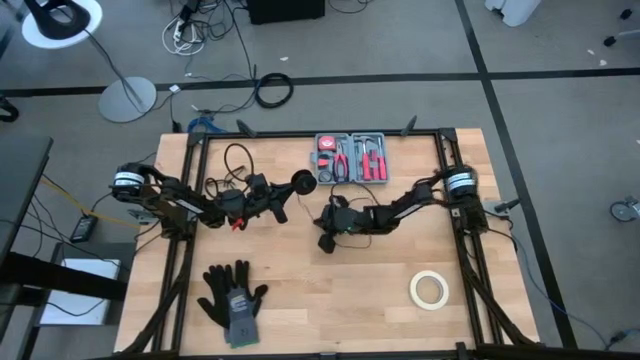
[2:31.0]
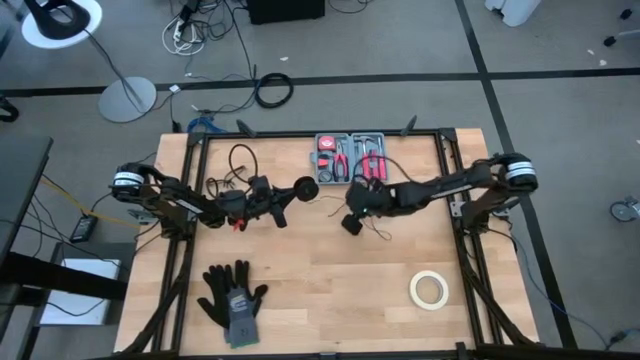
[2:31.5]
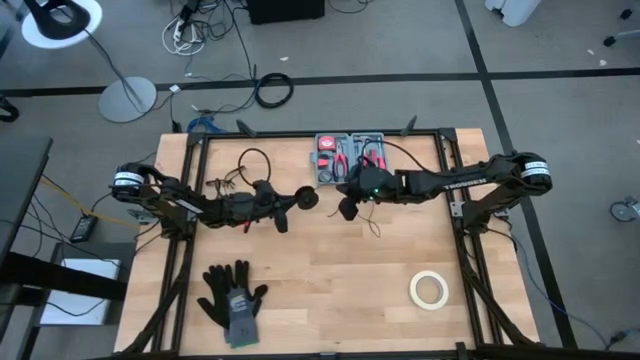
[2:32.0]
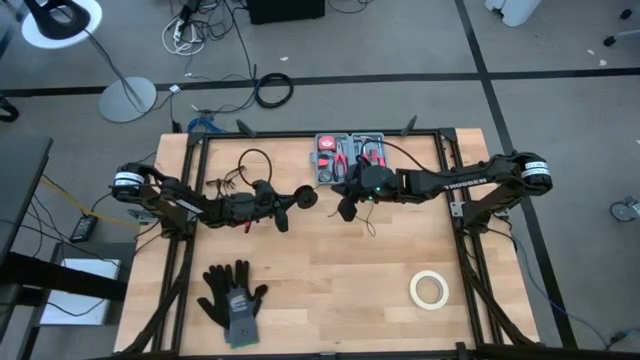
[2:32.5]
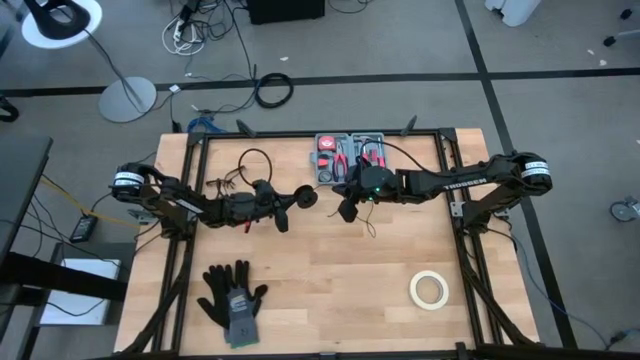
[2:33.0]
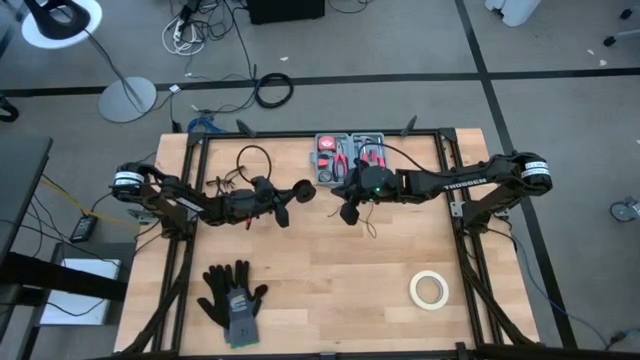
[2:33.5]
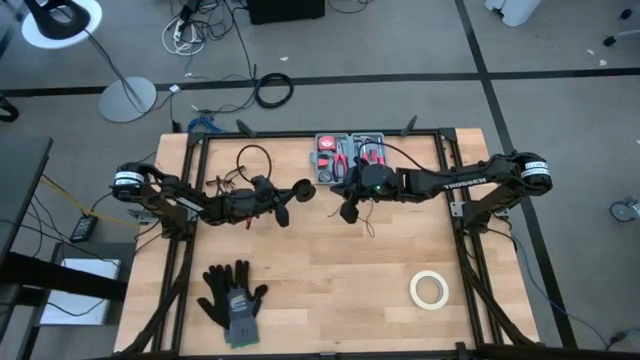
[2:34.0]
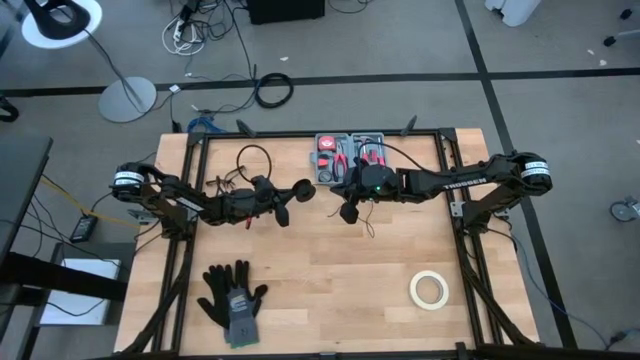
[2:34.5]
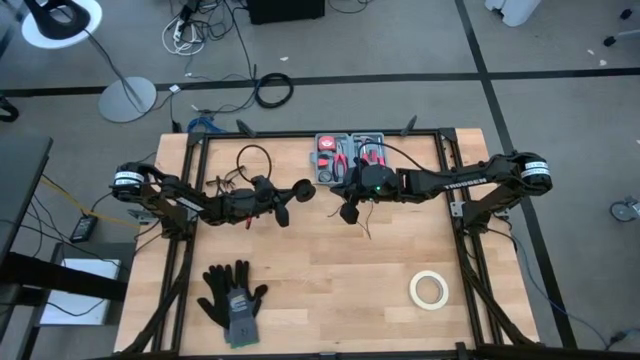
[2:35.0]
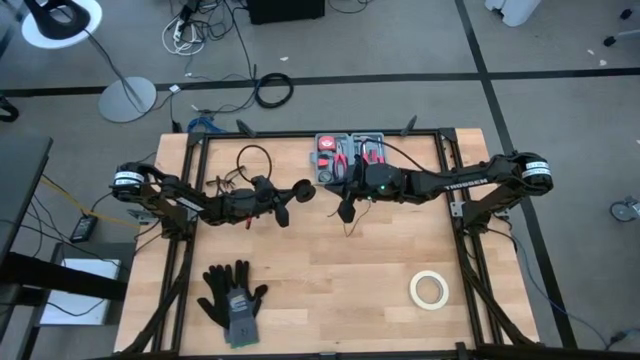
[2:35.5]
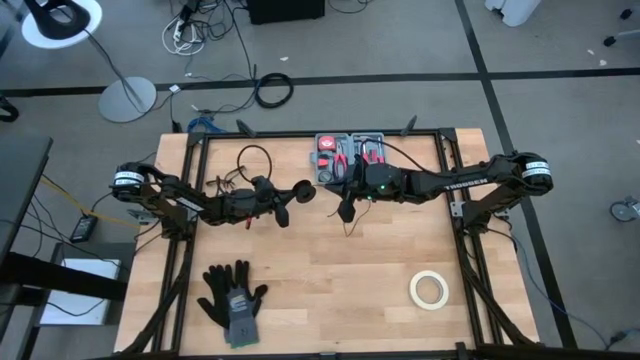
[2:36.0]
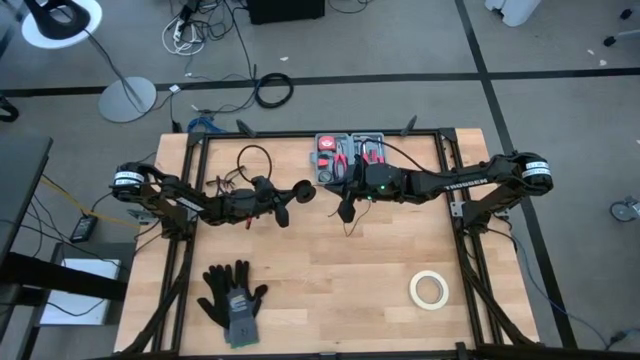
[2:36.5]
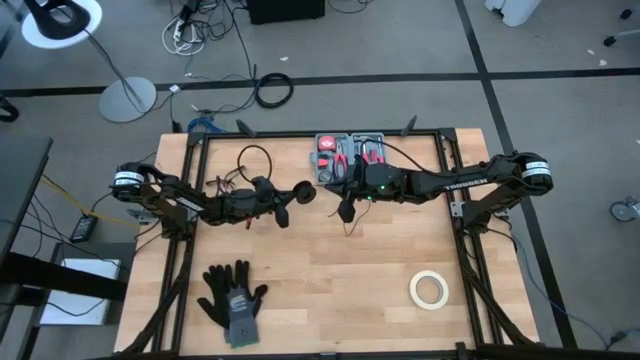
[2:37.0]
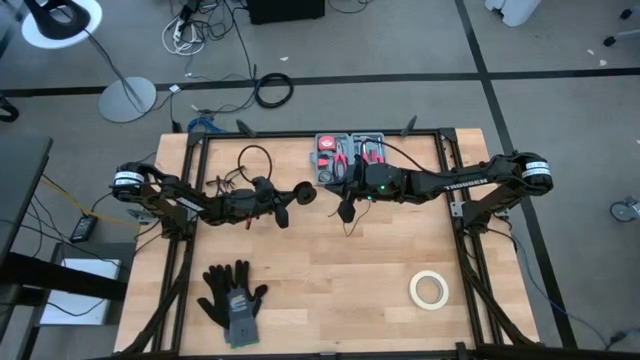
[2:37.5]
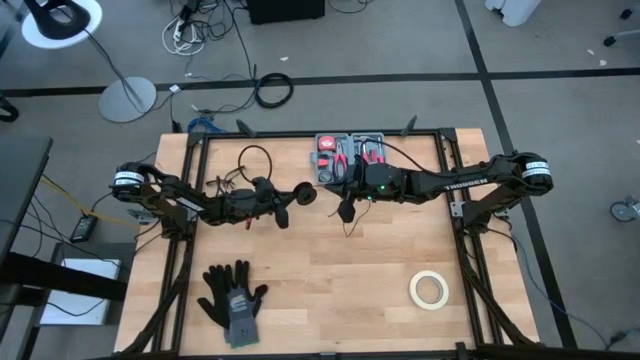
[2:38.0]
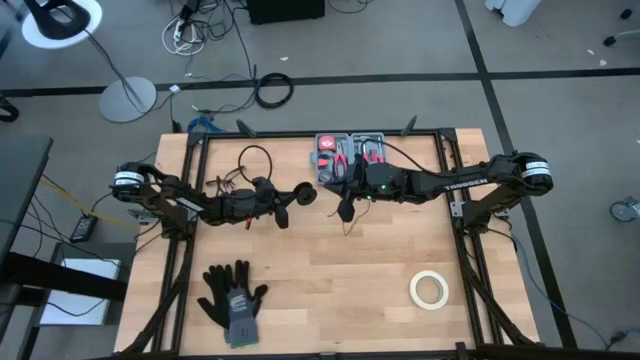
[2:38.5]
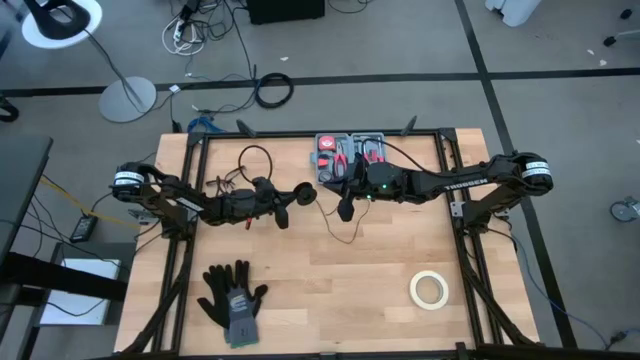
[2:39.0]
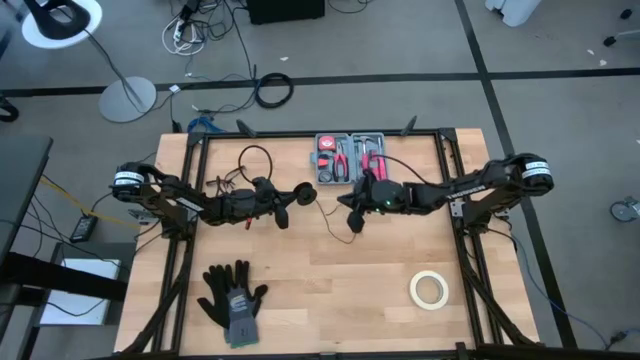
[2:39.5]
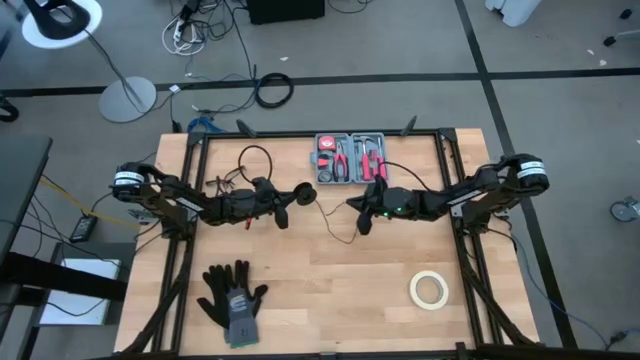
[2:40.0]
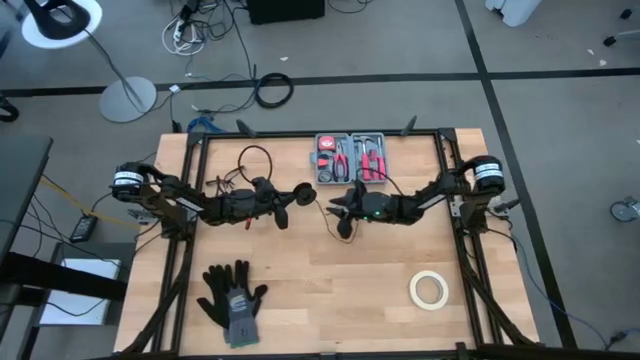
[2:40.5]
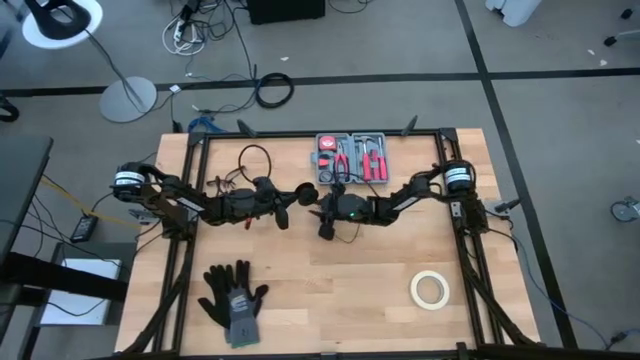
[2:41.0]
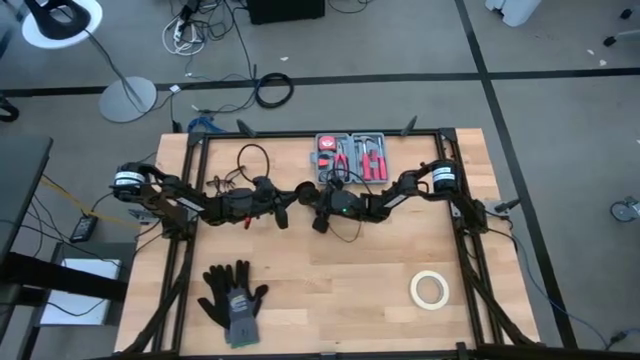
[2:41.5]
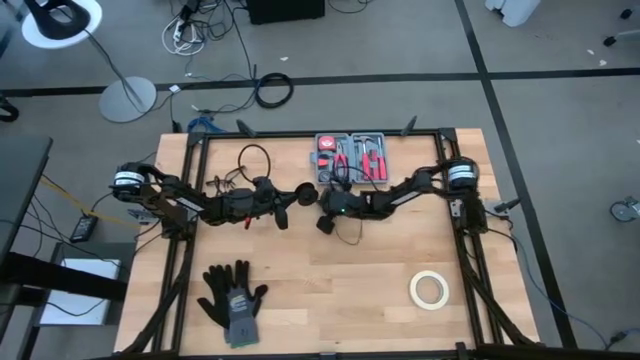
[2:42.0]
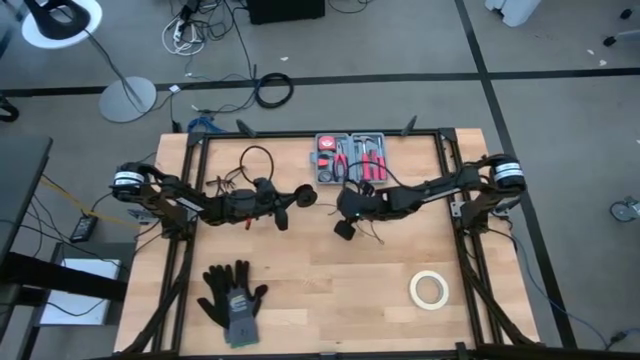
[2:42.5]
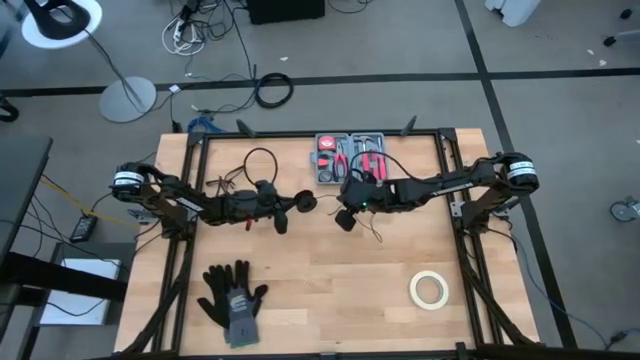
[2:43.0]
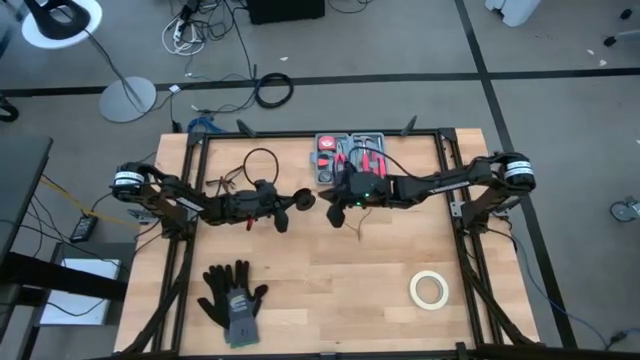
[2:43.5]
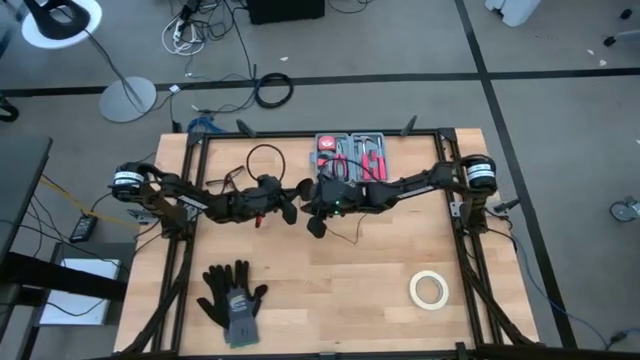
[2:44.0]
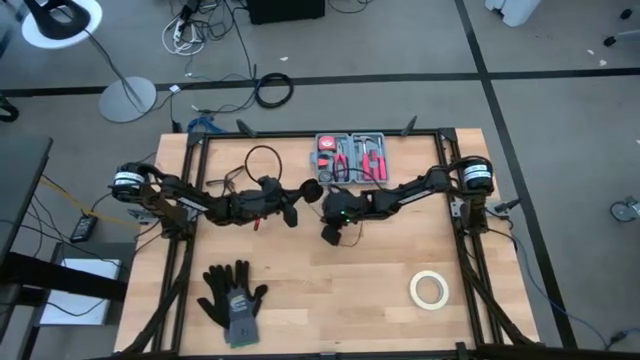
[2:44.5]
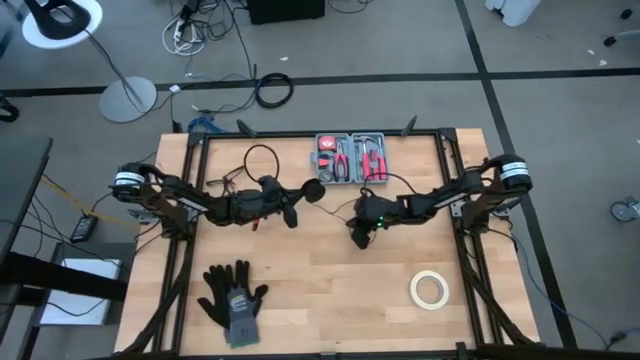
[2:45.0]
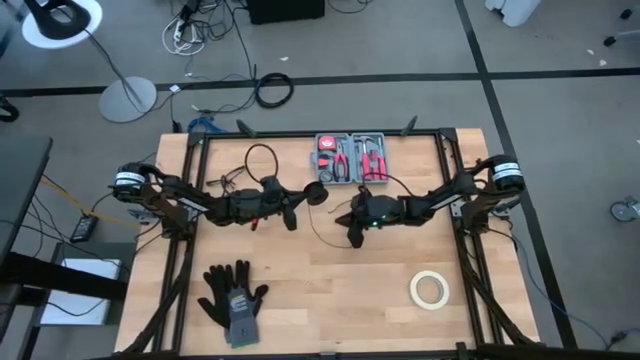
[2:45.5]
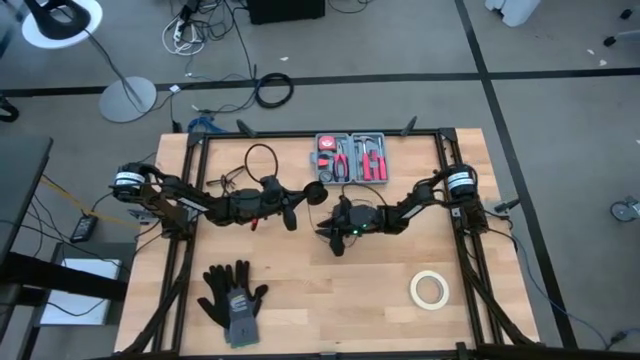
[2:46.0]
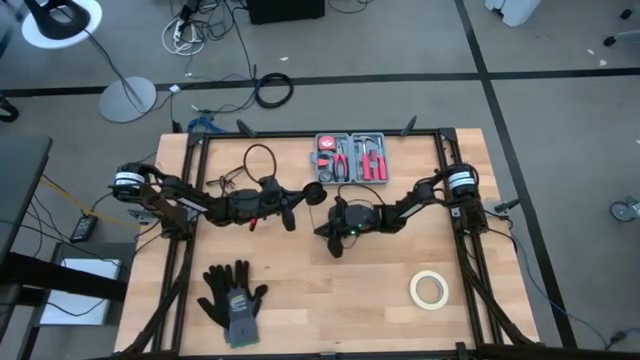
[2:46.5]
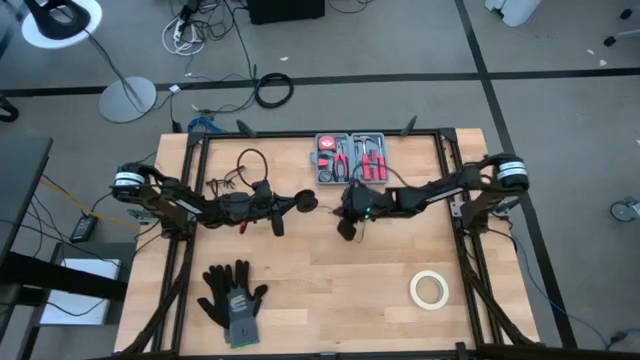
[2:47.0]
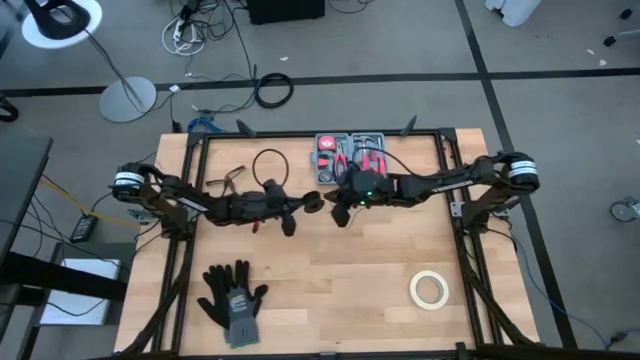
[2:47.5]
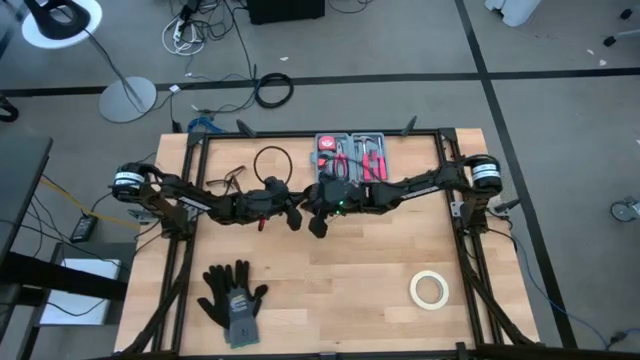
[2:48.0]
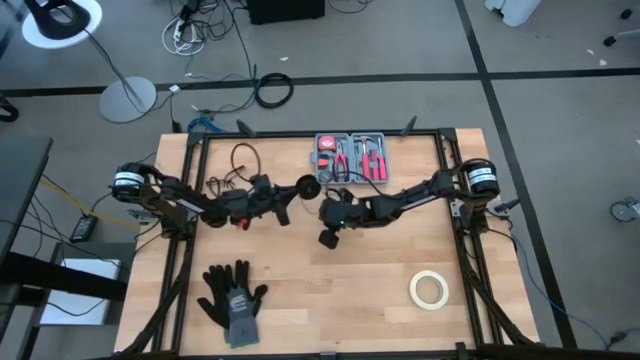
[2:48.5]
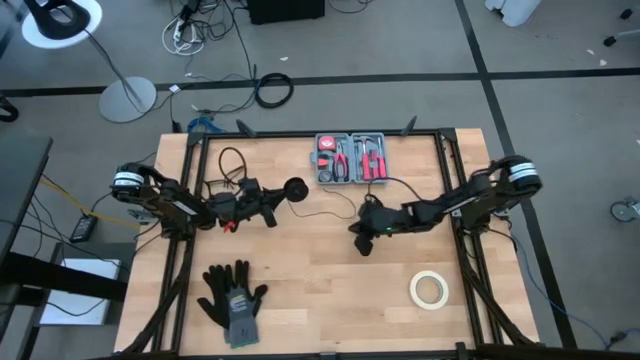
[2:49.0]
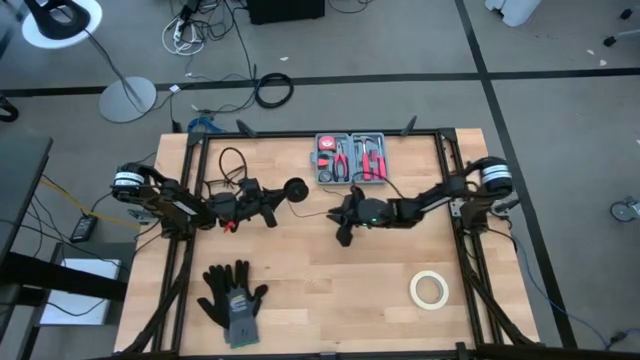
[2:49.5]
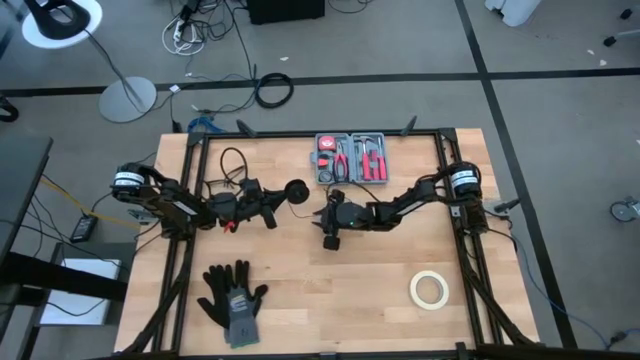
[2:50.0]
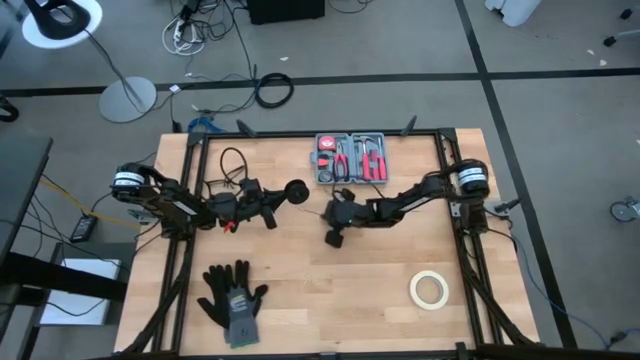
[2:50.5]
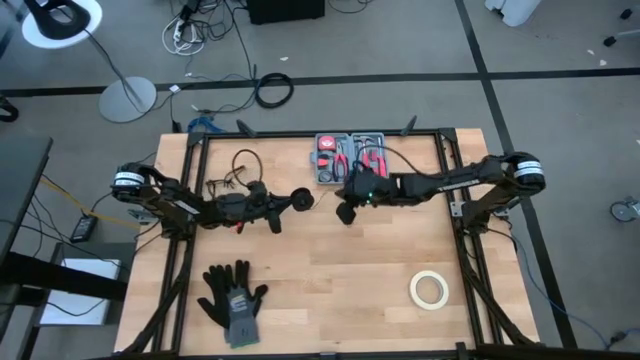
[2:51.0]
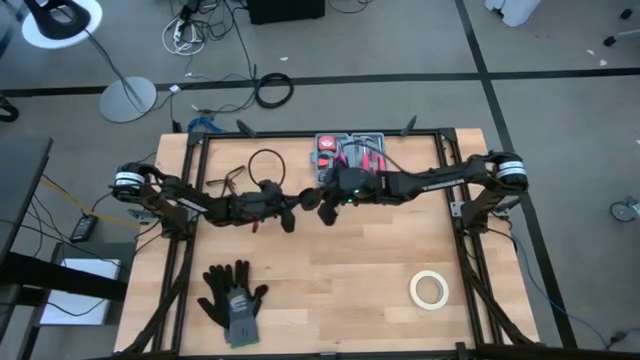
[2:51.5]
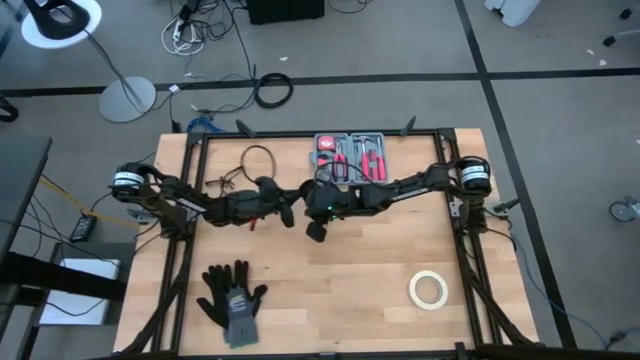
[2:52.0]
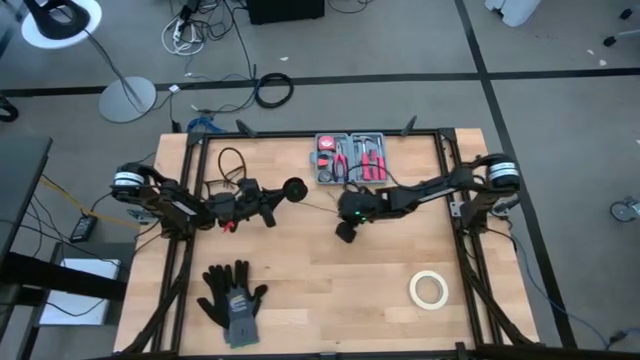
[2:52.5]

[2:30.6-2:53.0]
Task: Coil cords
Coil the black wire onto the black spool
